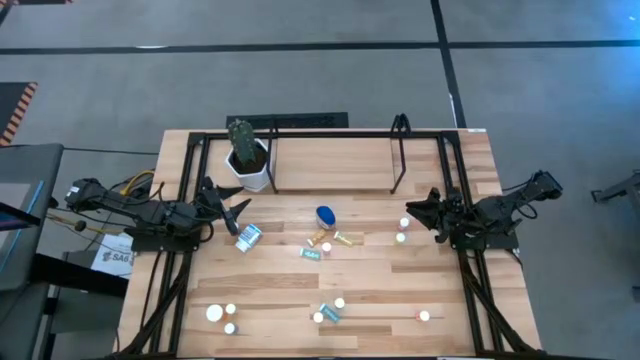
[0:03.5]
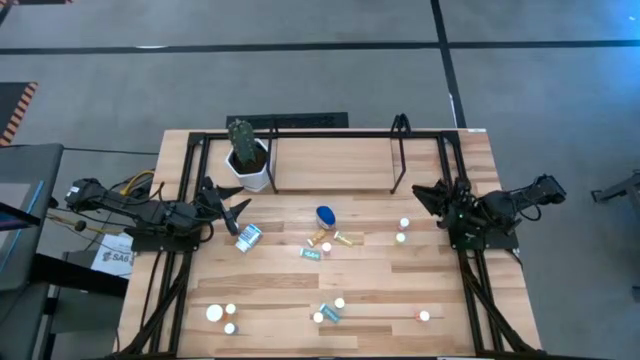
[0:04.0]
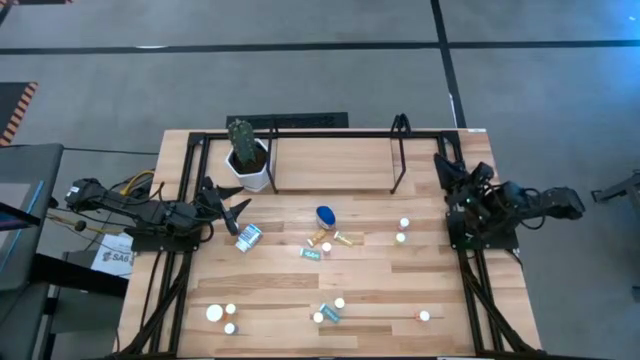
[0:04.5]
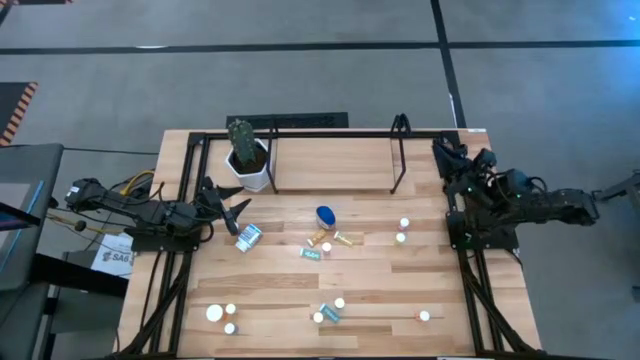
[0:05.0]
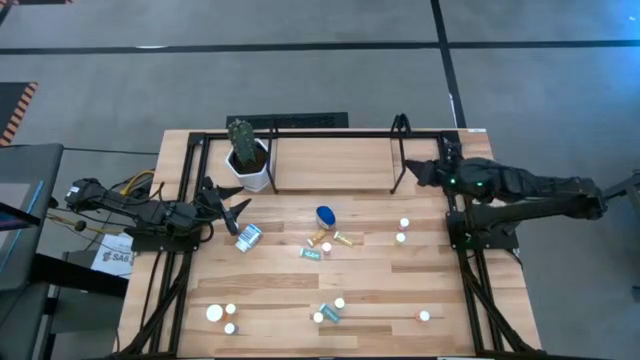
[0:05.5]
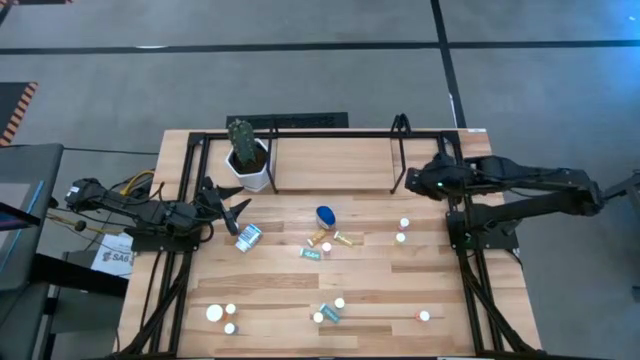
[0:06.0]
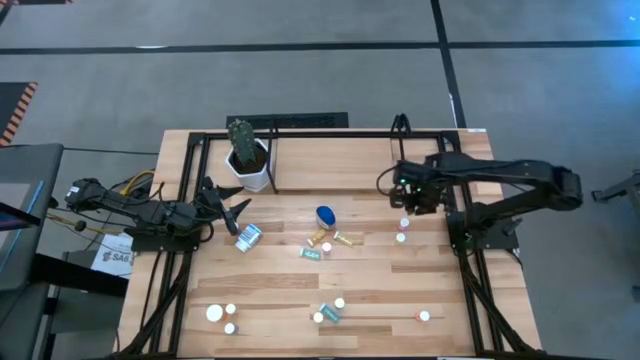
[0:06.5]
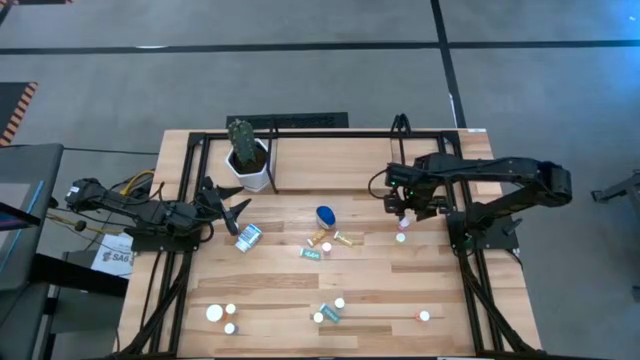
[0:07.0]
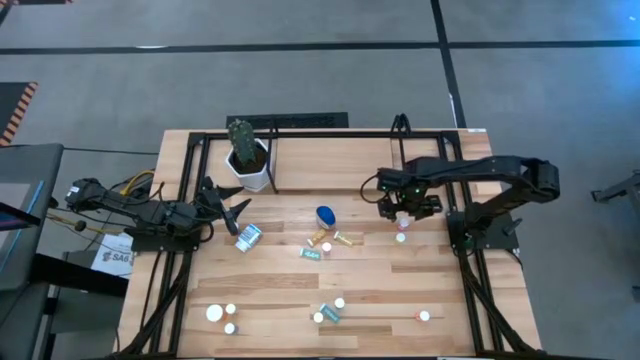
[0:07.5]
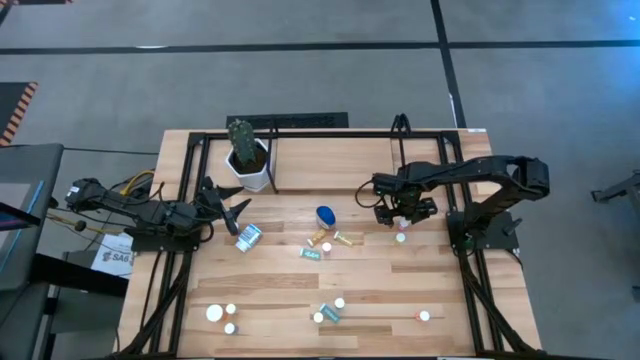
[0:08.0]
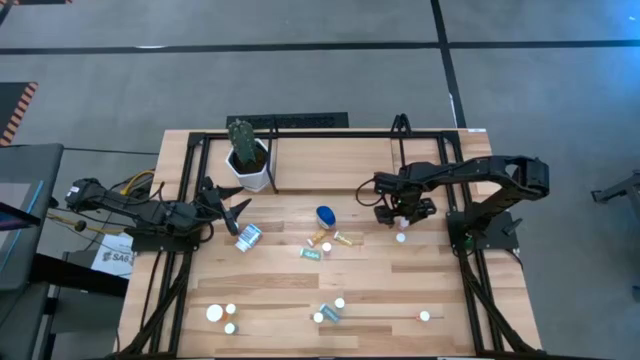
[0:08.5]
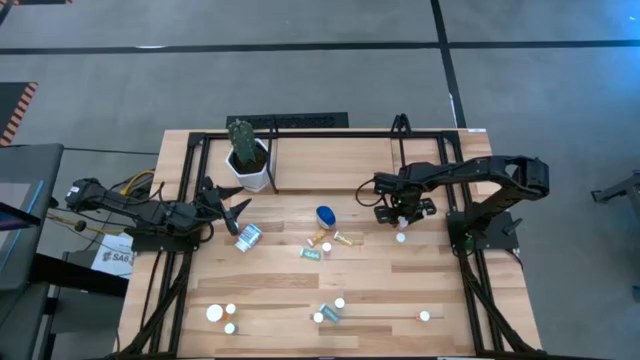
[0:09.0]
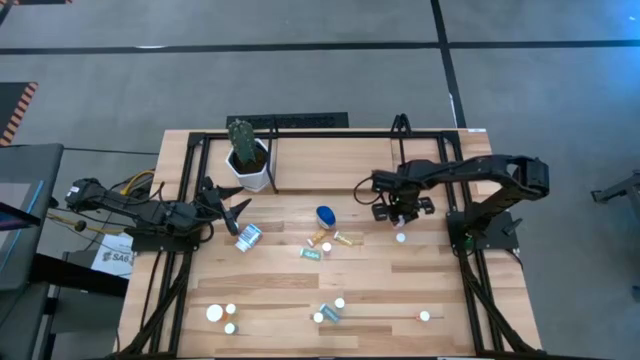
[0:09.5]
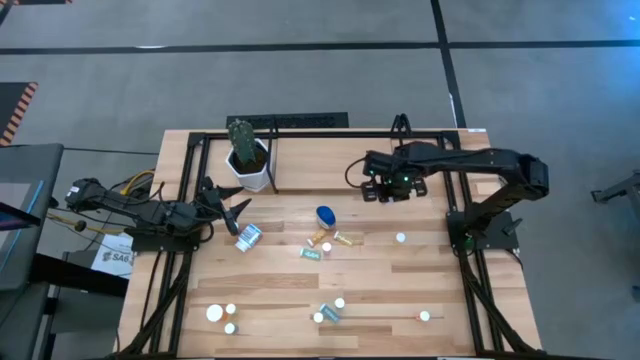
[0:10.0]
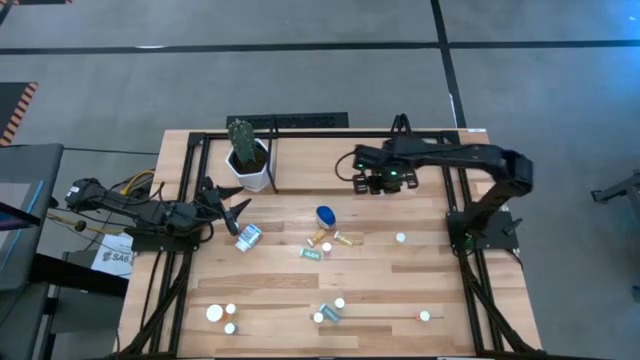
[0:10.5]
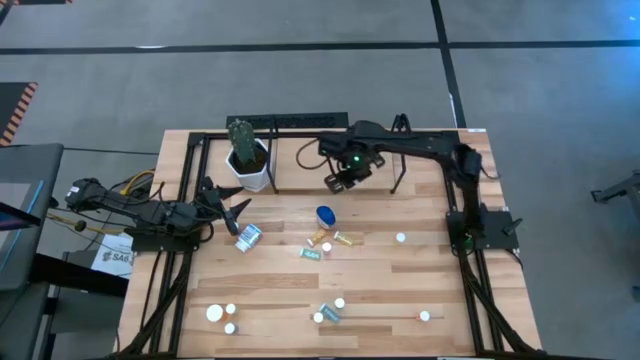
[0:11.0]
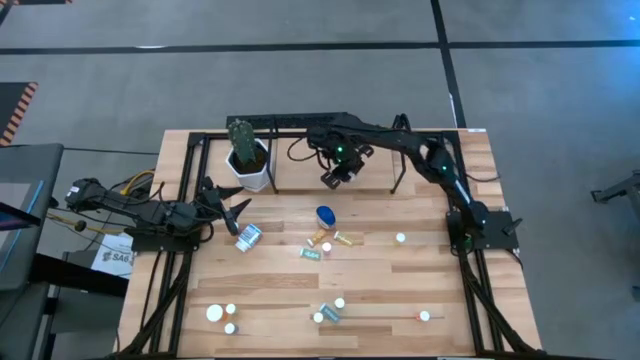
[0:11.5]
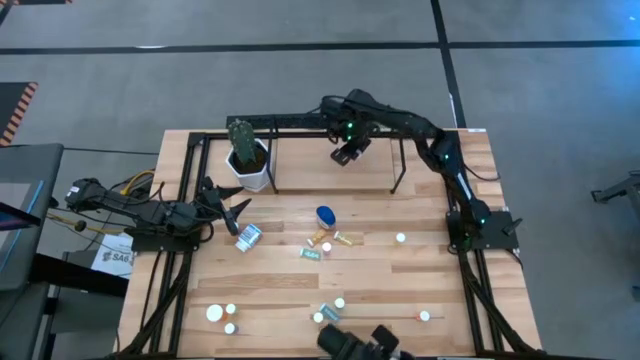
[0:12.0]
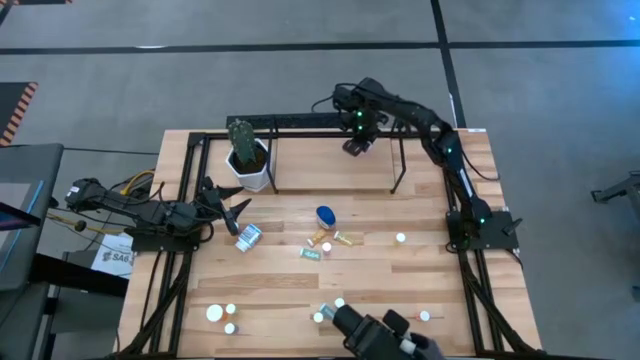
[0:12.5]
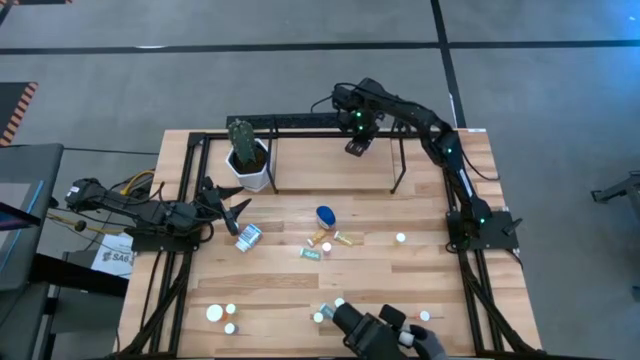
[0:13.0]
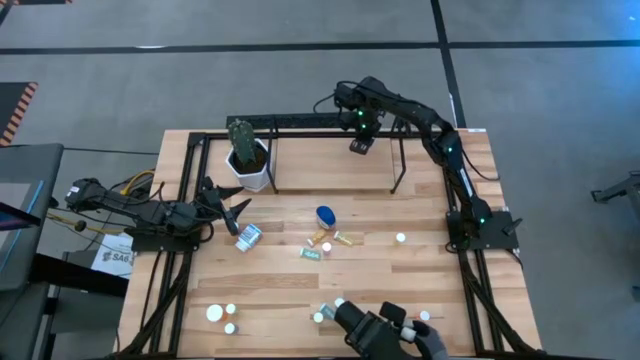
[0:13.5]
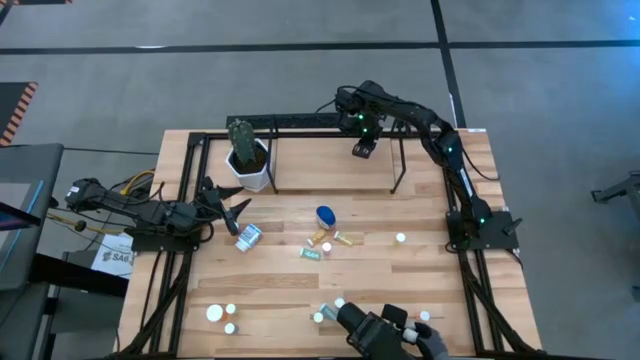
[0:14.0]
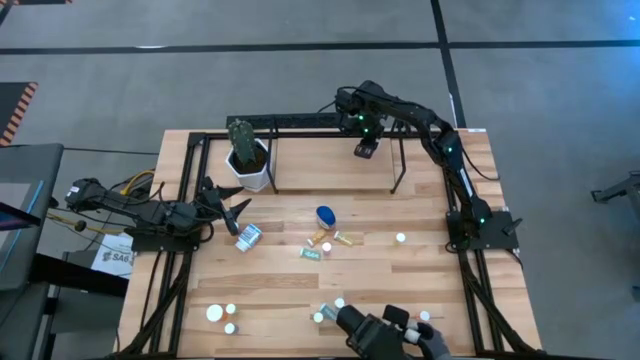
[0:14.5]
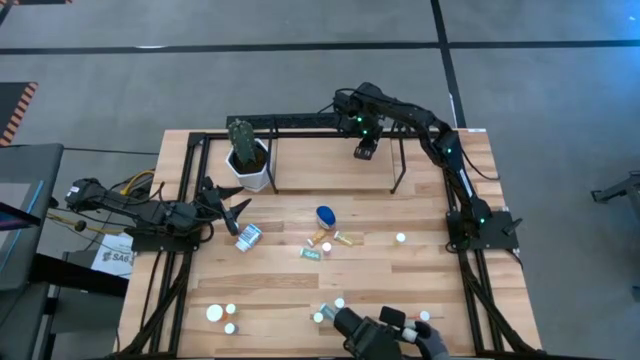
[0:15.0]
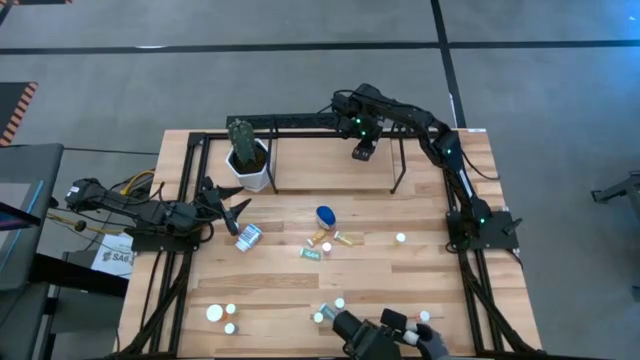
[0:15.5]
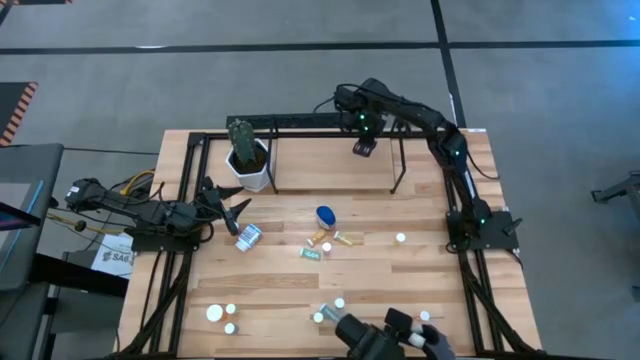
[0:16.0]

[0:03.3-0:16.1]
Task: Pick and place medicine bottles onto shelf by color
Put the pink pill bottle on the shelf

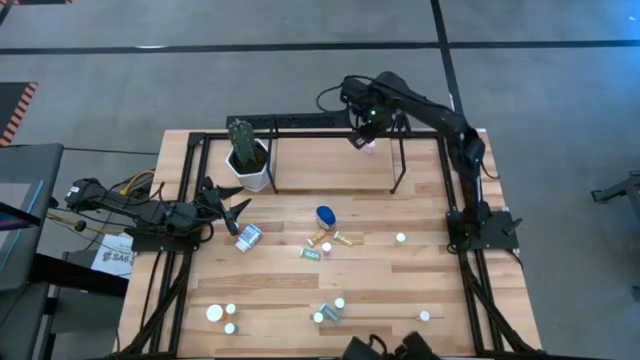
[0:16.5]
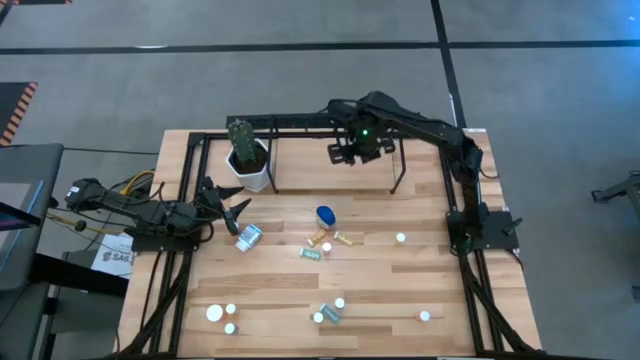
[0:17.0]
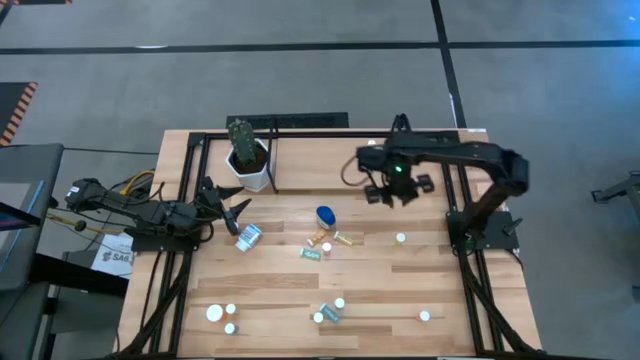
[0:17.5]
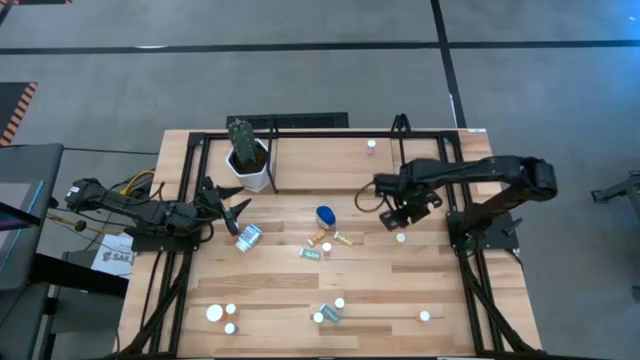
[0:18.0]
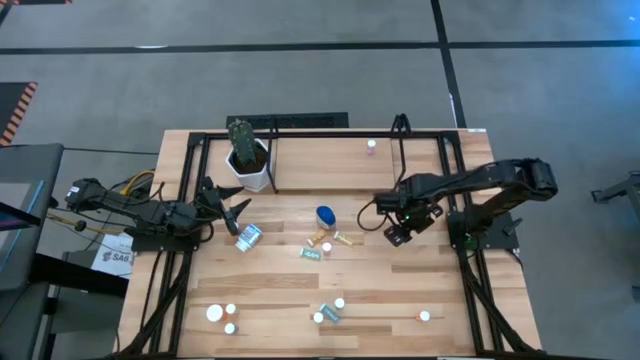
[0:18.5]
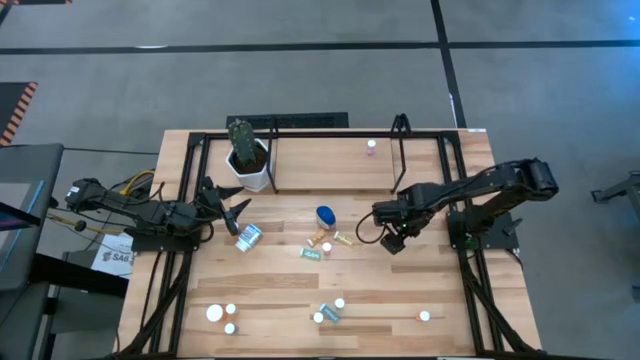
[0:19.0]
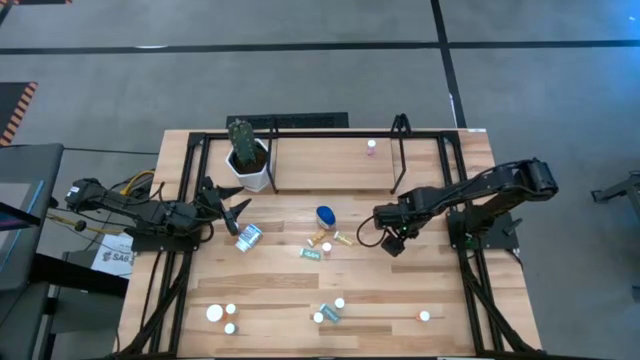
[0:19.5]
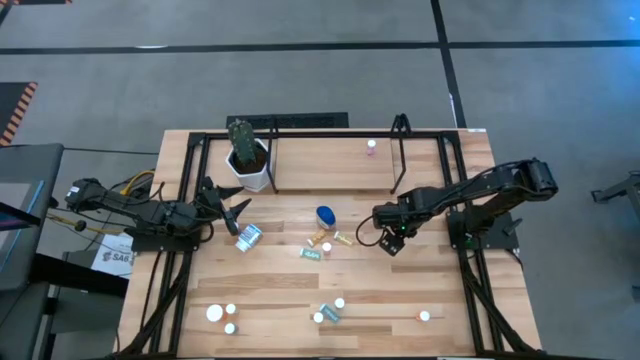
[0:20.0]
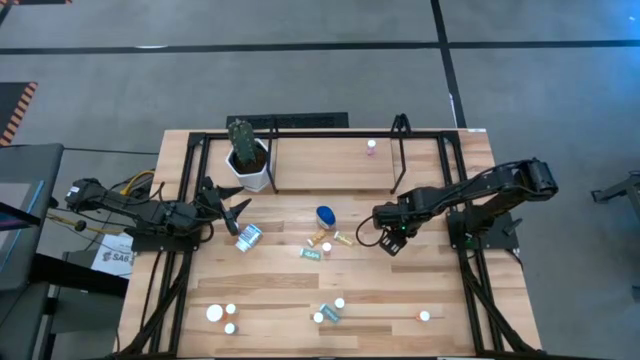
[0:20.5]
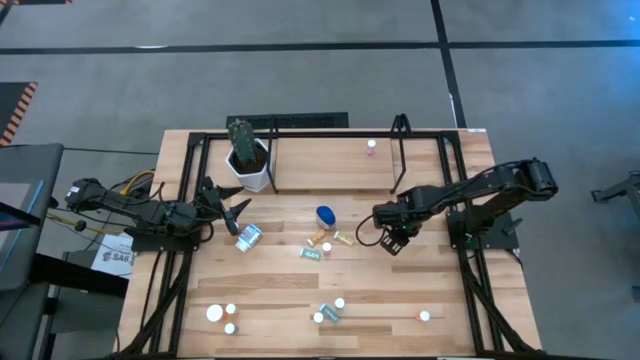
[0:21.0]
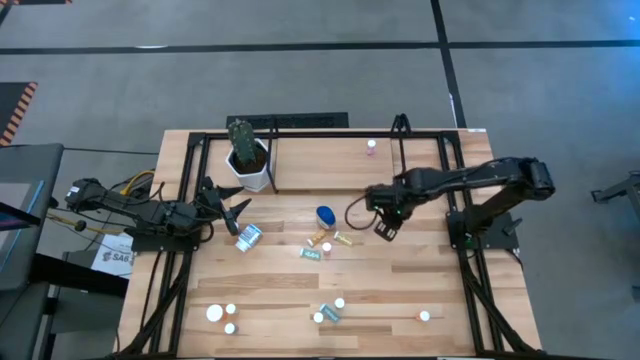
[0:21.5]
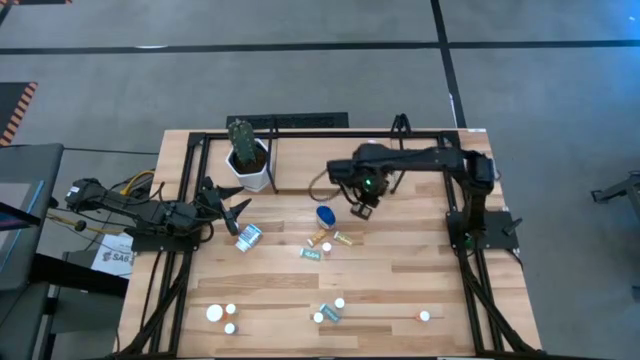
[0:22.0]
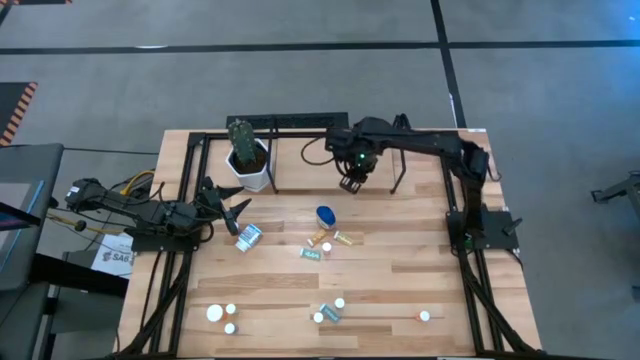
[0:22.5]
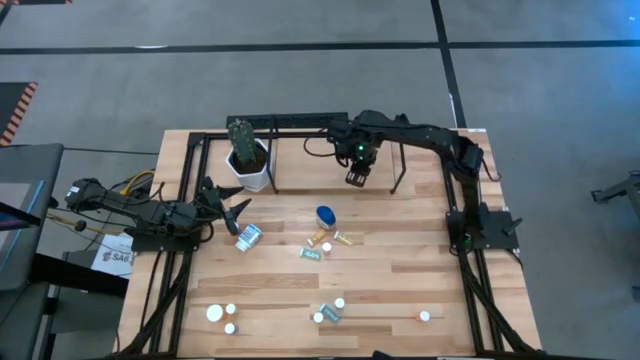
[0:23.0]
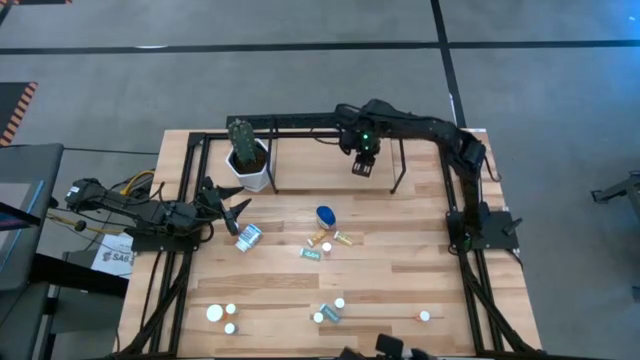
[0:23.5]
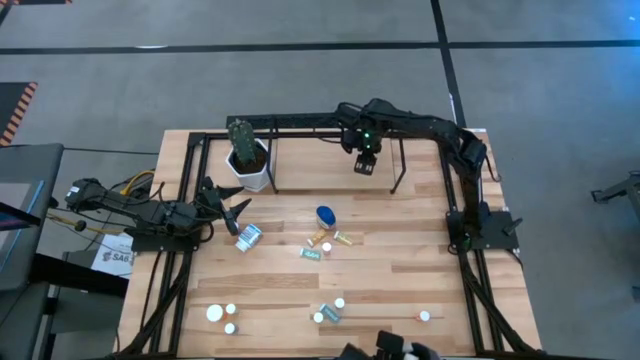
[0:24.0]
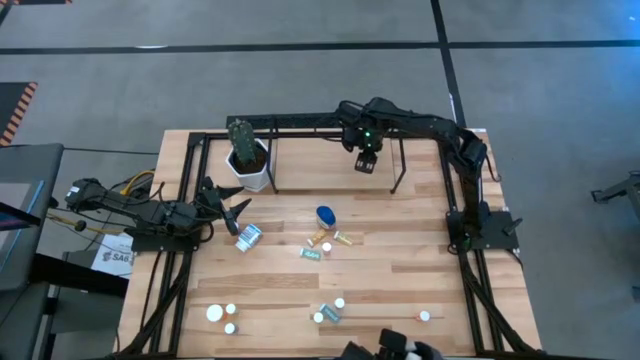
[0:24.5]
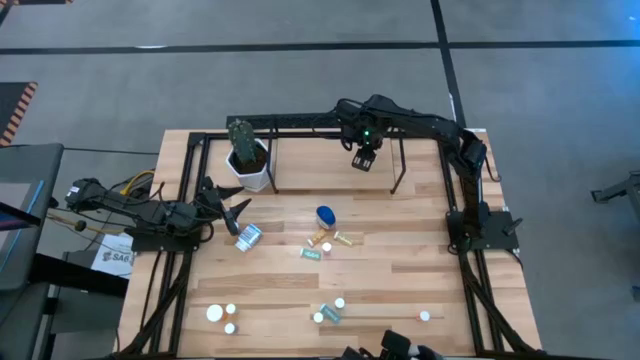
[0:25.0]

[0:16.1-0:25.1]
Put the yellow pill bottle on the shelf
